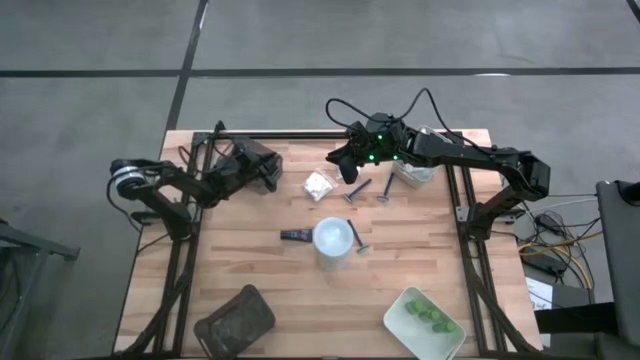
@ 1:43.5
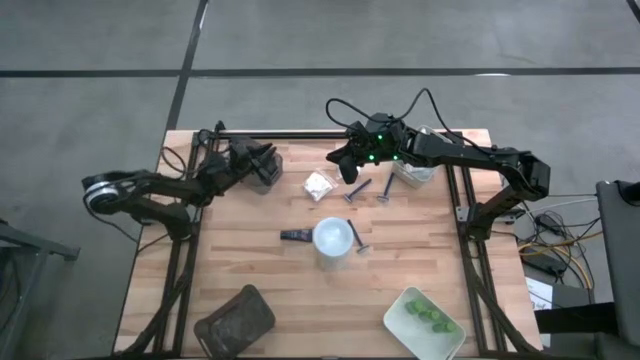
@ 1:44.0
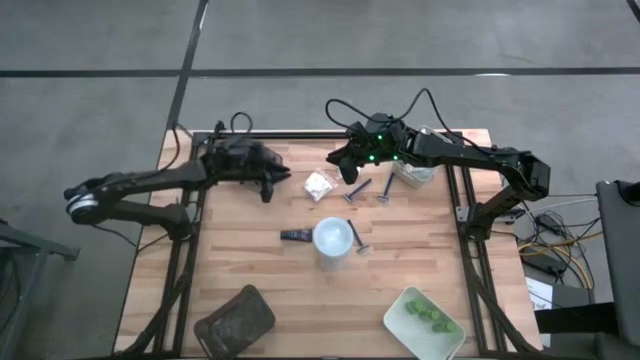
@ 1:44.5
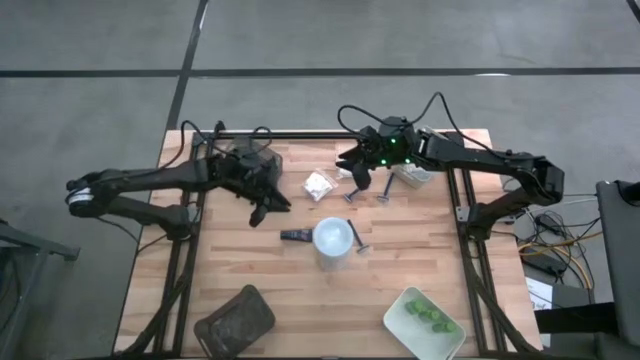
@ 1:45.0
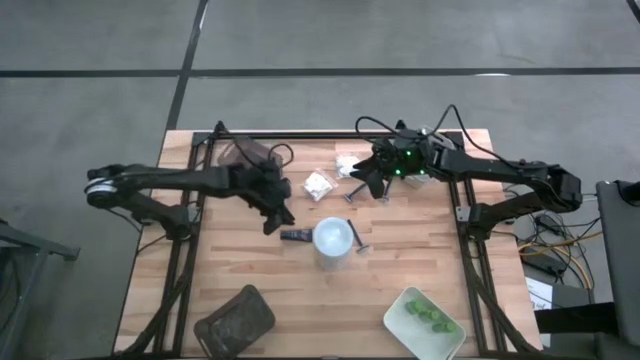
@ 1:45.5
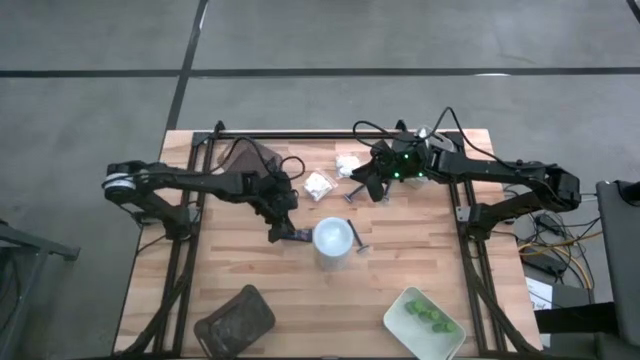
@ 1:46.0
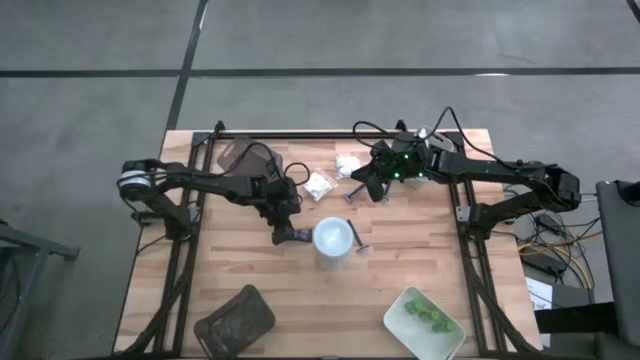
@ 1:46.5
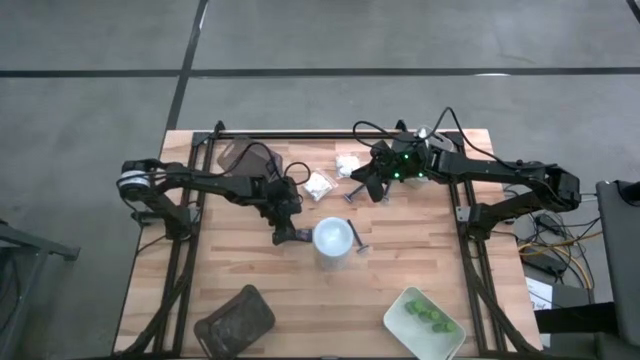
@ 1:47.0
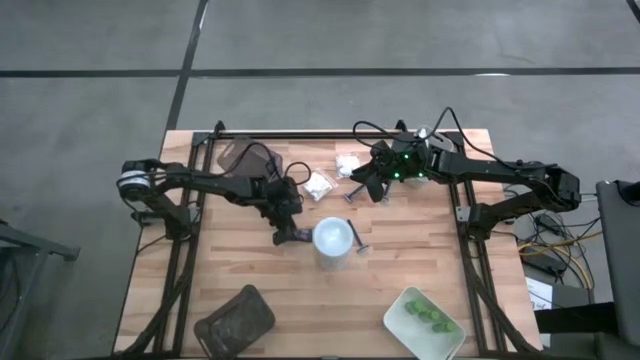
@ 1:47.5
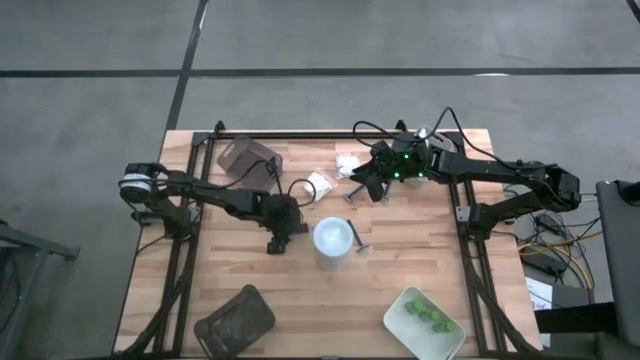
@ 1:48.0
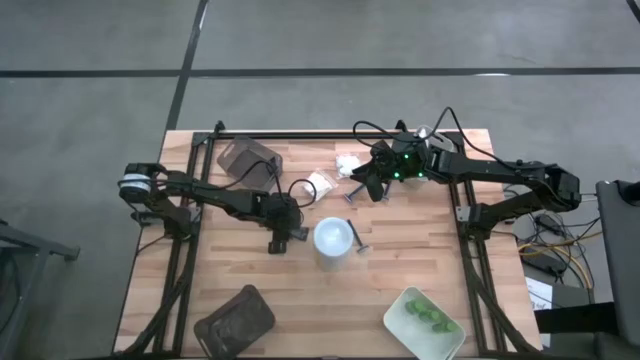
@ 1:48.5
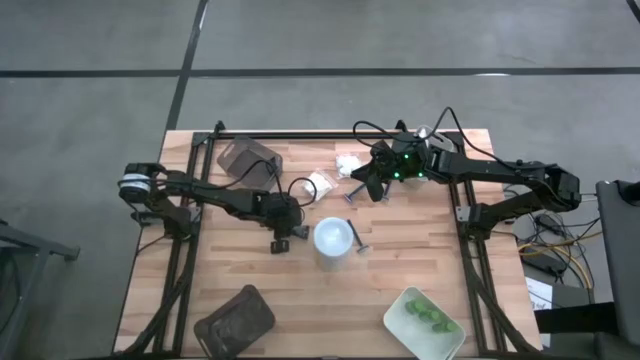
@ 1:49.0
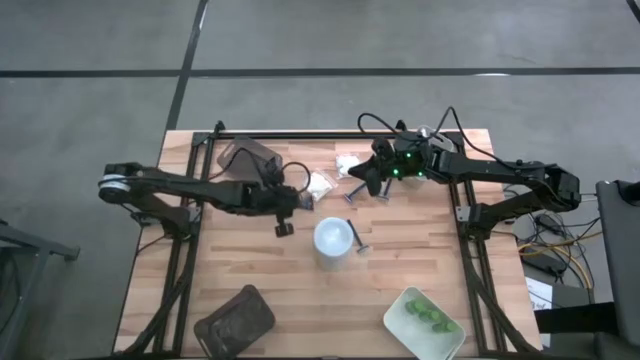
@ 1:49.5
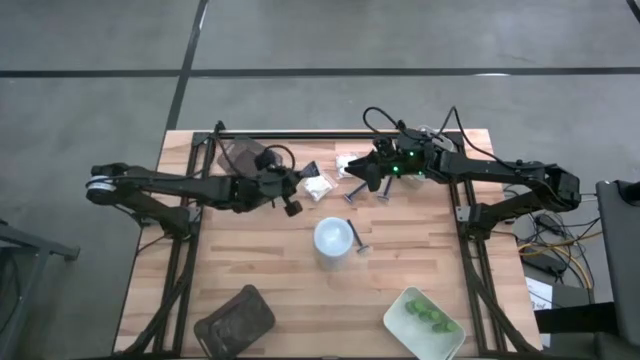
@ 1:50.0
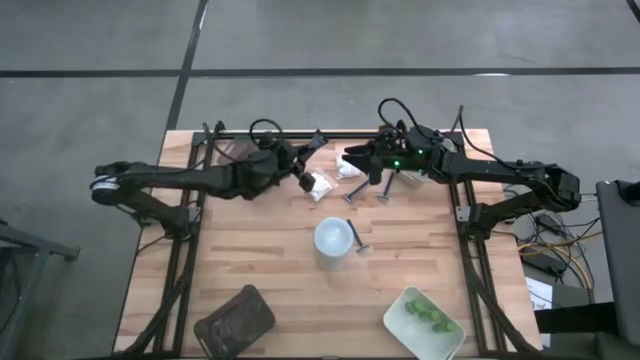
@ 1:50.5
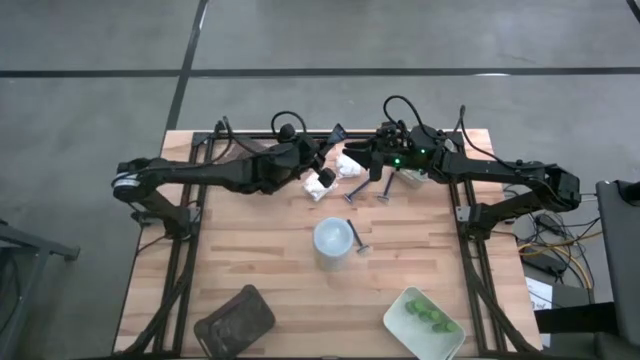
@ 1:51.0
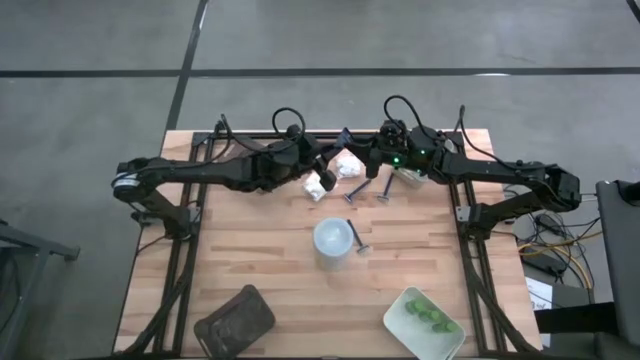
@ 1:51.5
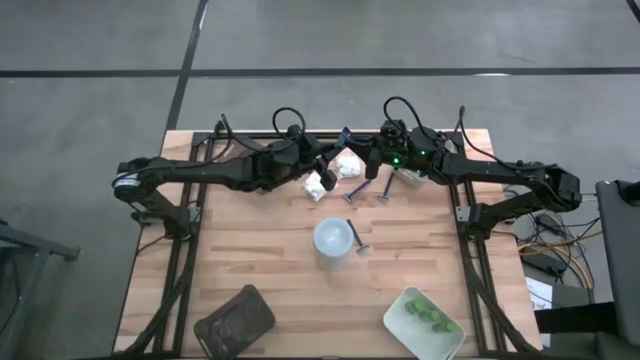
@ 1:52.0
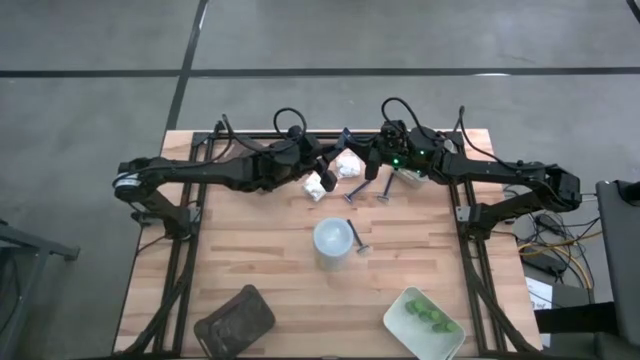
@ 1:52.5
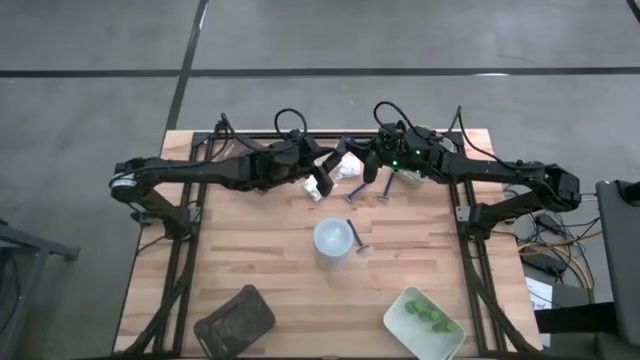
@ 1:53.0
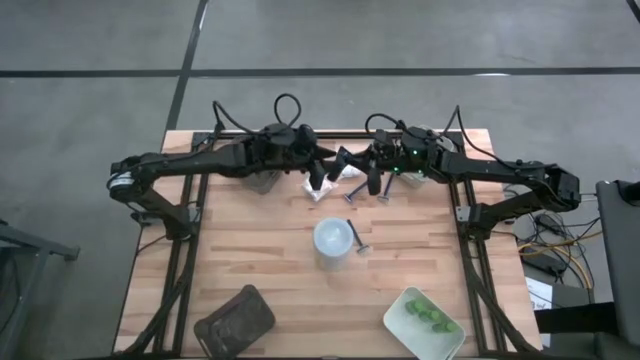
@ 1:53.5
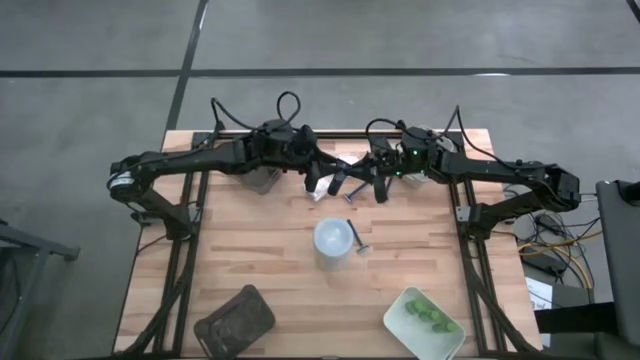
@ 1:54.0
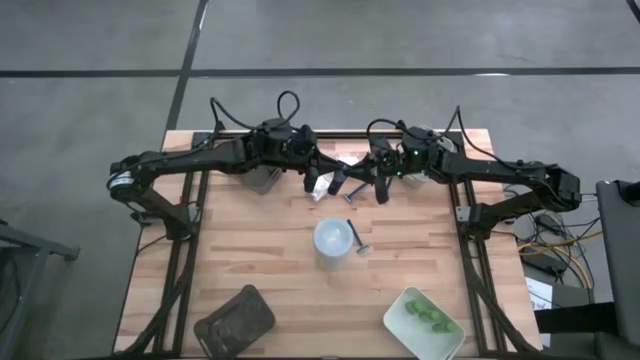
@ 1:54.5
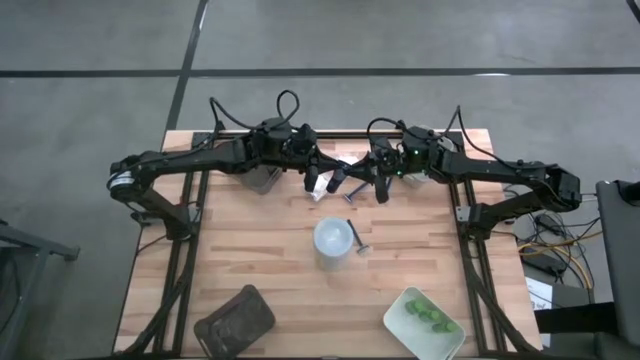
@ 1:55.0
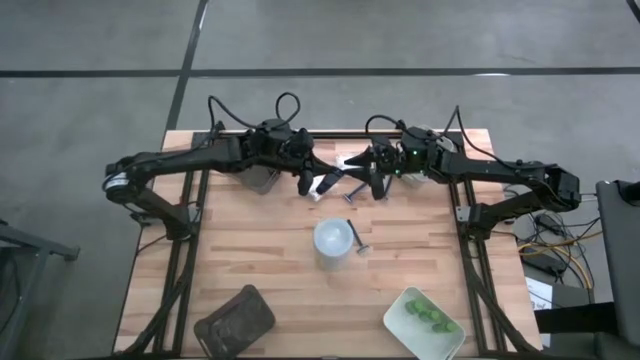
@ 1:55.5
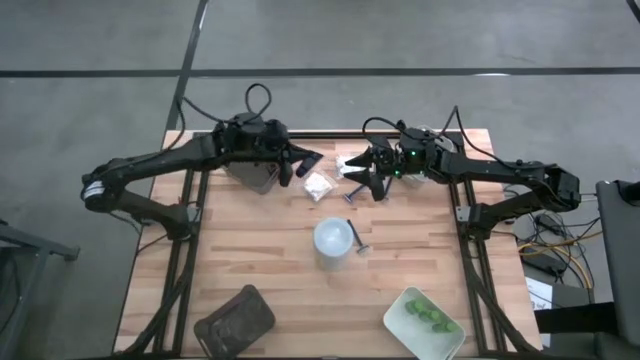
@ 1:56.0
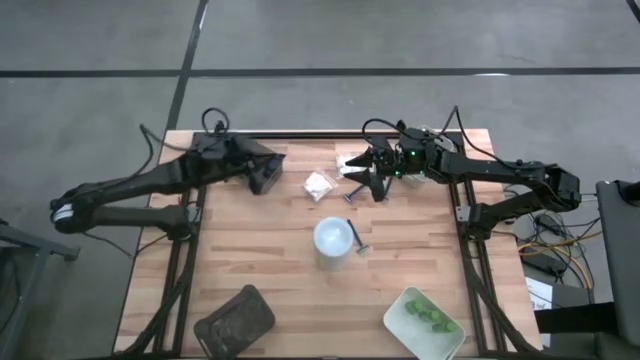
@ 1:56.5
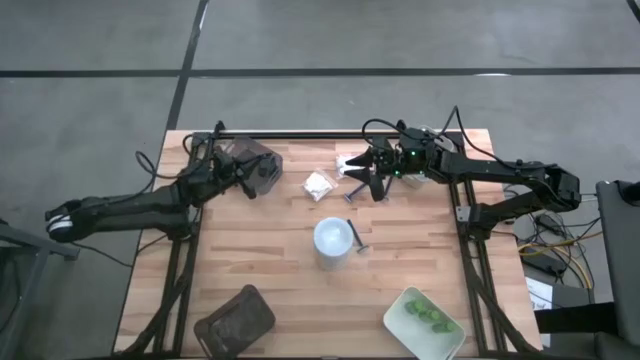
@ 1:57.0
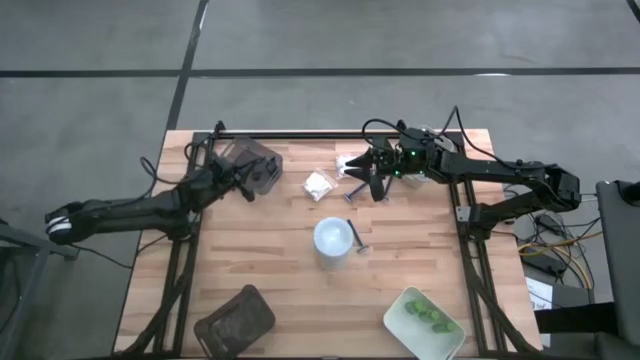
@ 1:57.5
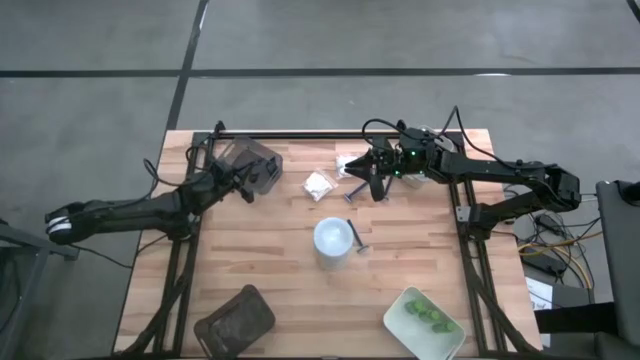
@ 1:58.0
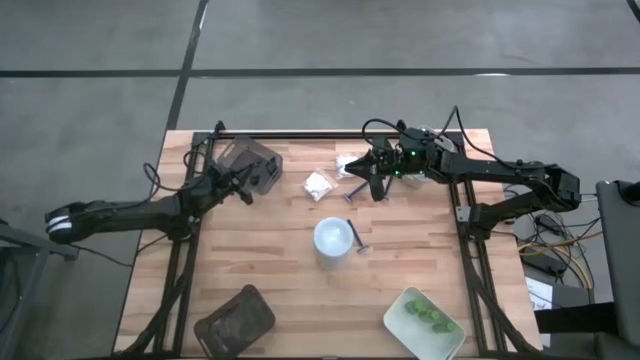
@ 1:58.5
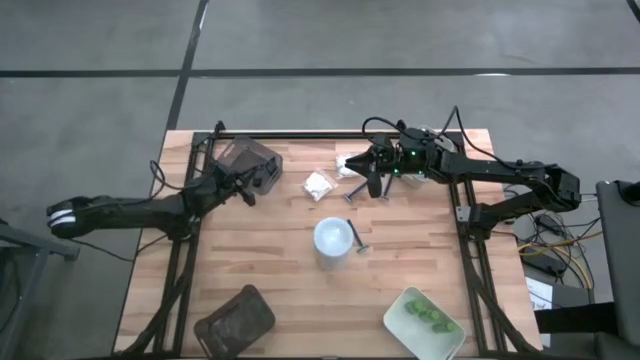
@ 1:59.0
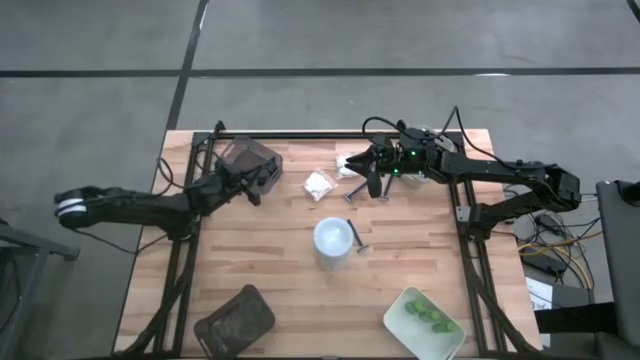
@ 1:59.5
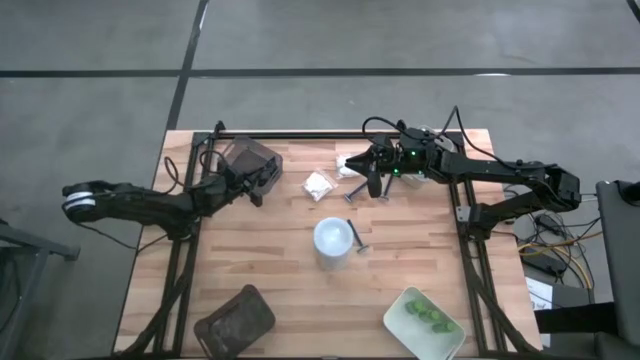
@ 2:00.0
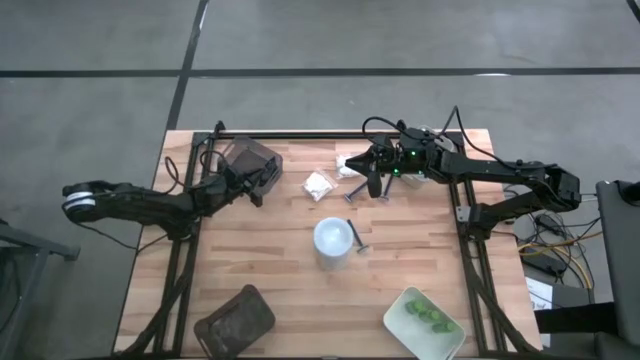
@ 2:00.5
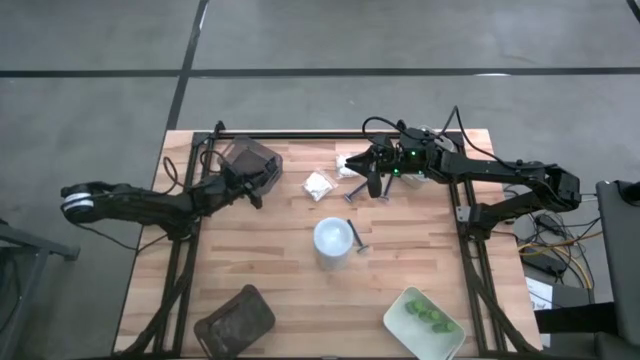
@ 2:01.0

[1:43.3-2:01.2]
Task: Pick & Place Travel size toiletries
Put the blue shave cream into the top black bin

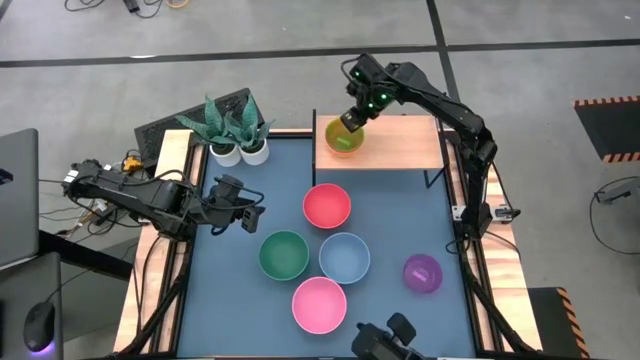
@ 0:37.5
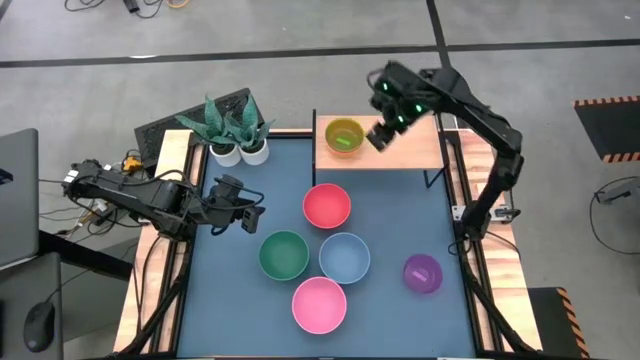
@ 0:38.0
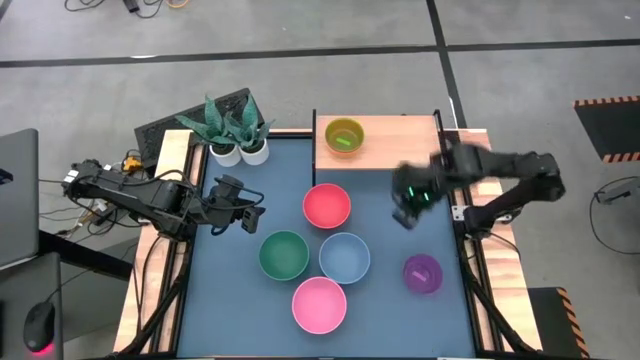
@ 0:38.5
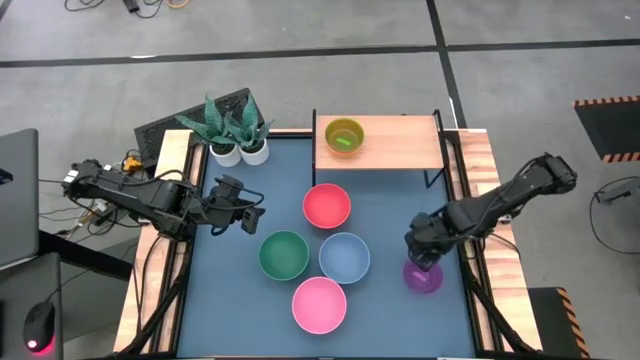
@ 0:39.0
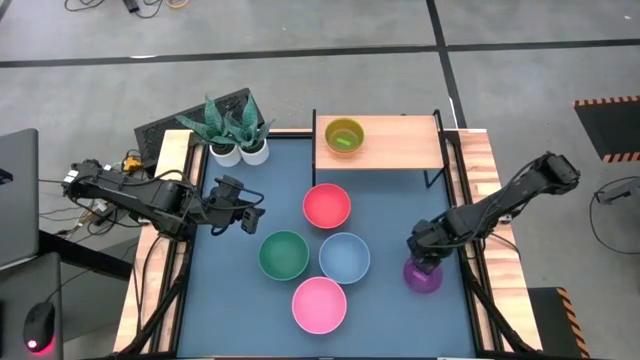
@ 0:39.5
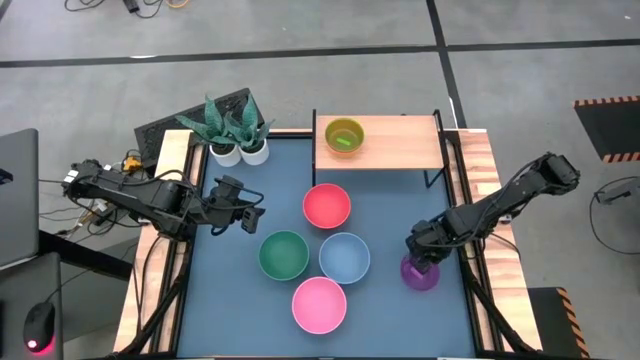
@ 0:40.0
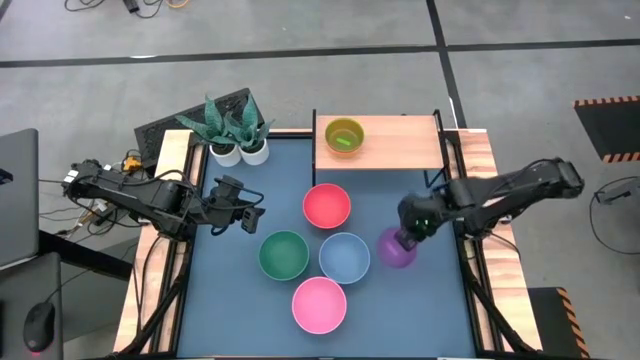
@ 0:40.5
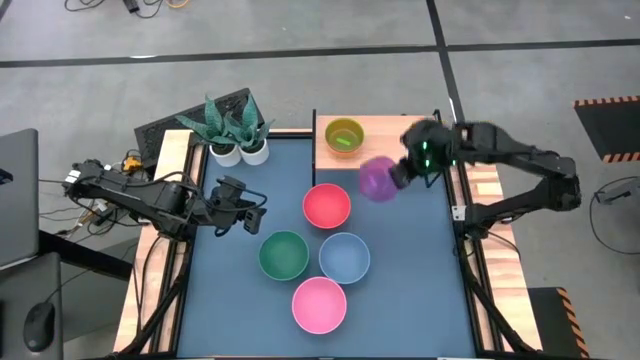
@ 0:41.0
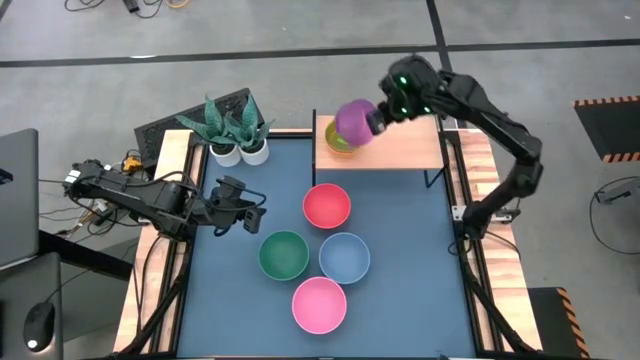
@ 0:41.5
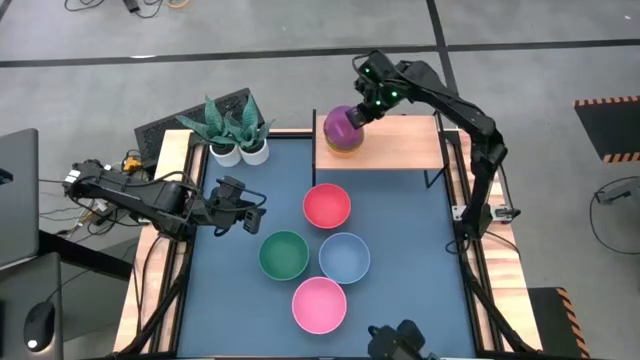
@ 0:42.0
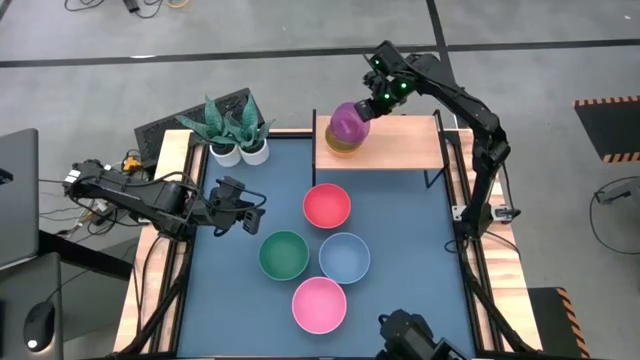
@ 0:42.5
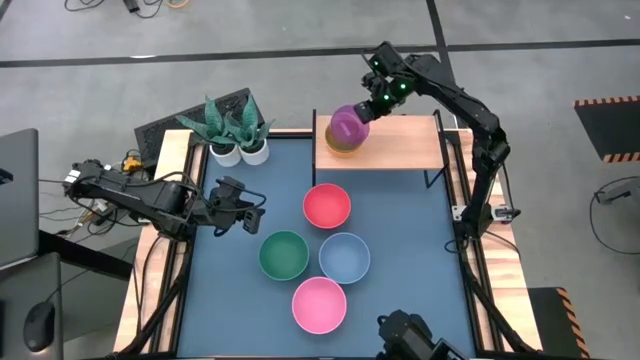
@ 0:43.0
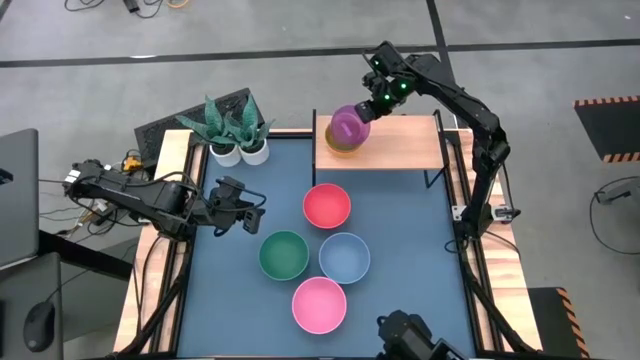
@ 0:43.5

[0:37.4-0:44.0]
Task: Place and stack bowls onto a shelf
Stack the violet transparent bowl on top of the green transparent bowl on the shelf
